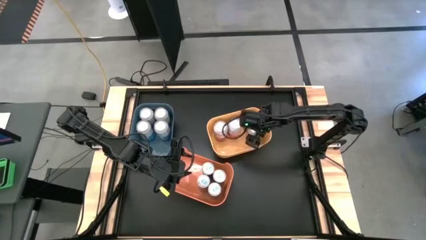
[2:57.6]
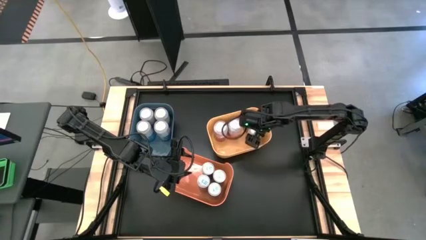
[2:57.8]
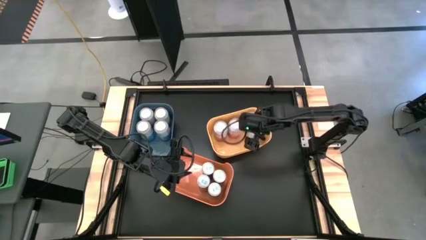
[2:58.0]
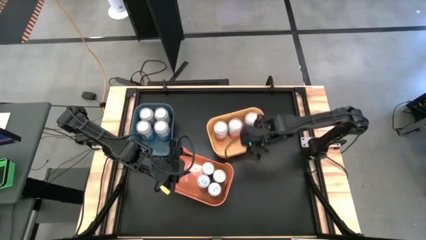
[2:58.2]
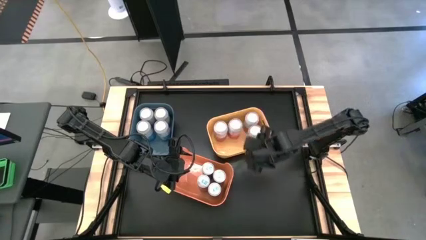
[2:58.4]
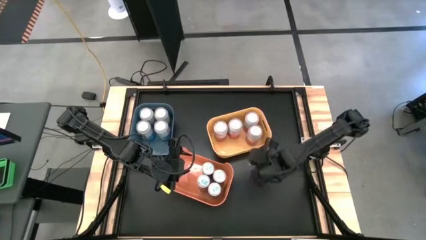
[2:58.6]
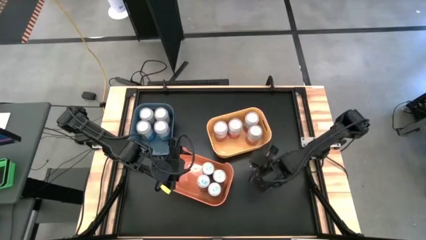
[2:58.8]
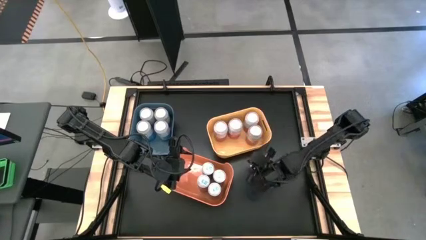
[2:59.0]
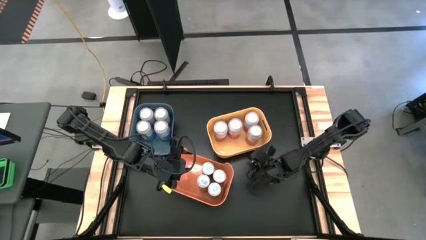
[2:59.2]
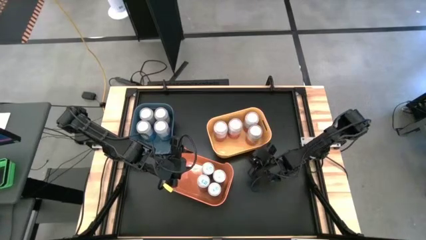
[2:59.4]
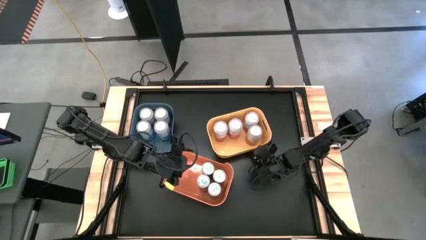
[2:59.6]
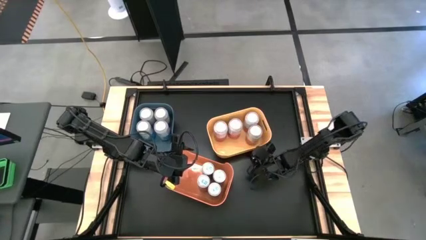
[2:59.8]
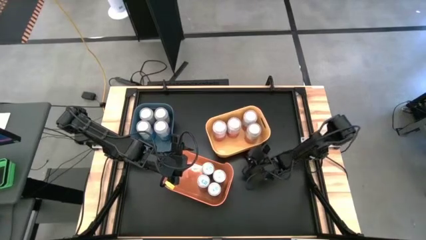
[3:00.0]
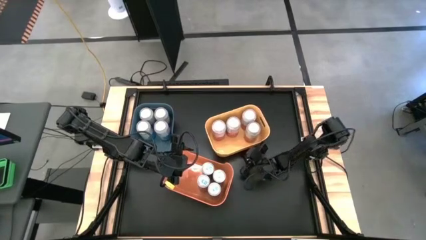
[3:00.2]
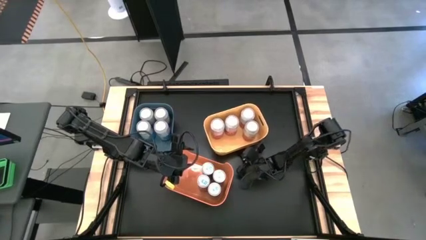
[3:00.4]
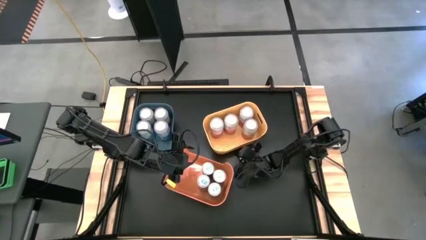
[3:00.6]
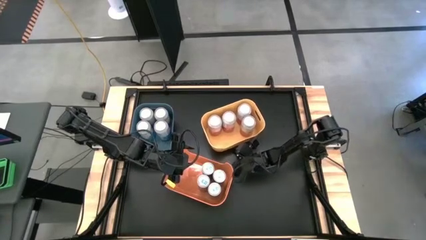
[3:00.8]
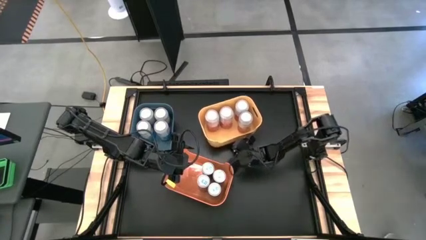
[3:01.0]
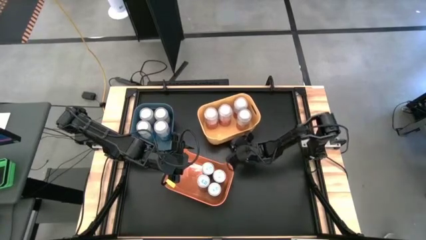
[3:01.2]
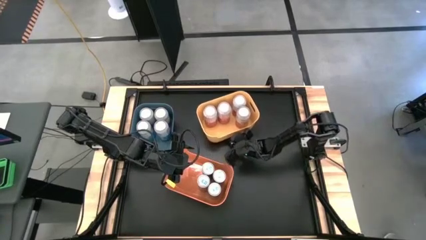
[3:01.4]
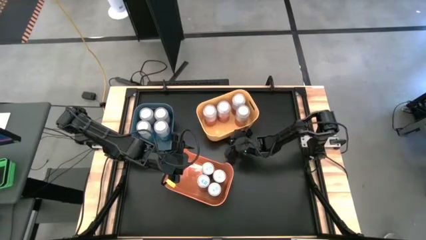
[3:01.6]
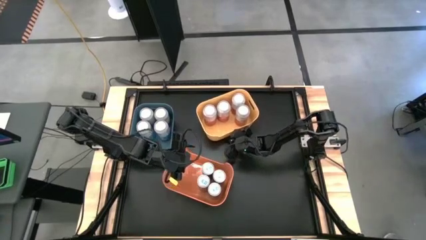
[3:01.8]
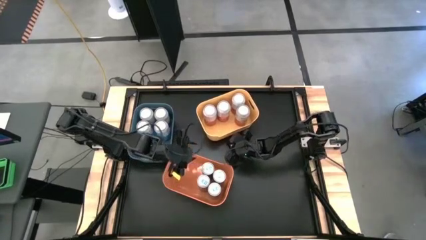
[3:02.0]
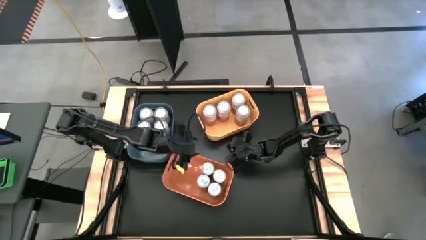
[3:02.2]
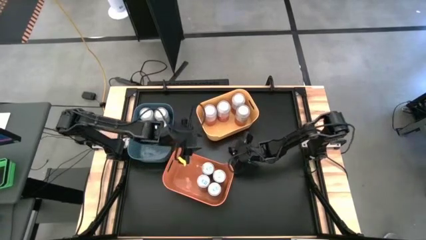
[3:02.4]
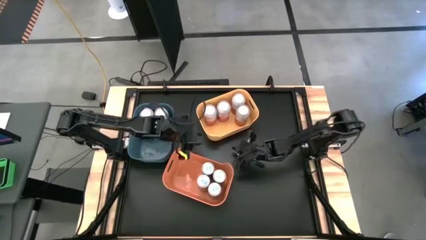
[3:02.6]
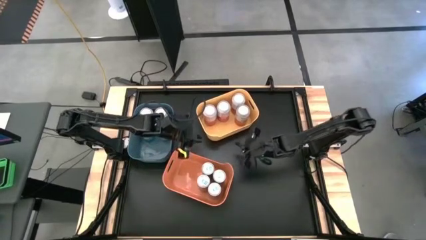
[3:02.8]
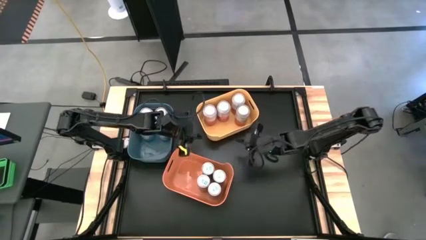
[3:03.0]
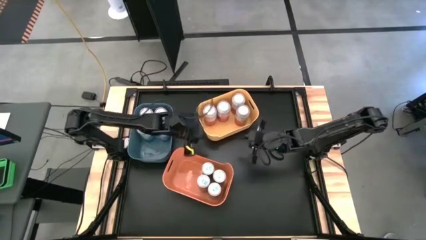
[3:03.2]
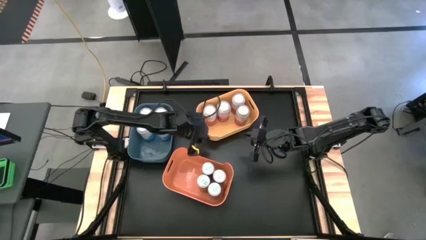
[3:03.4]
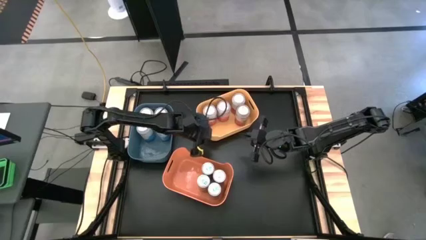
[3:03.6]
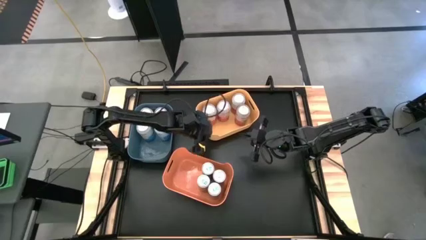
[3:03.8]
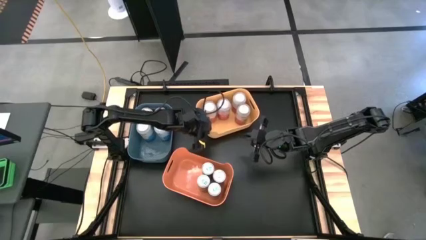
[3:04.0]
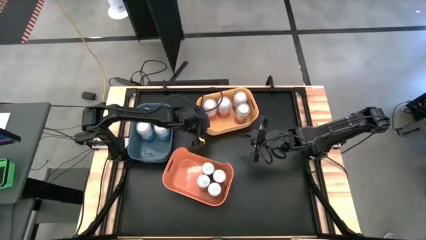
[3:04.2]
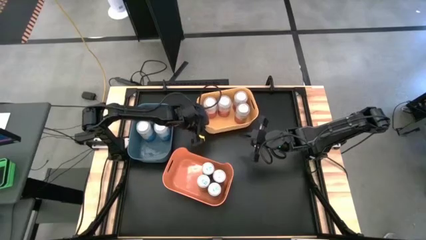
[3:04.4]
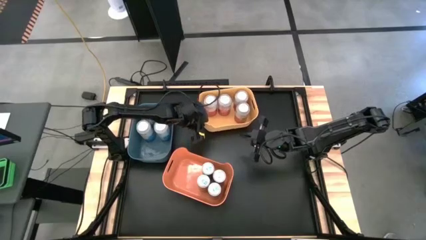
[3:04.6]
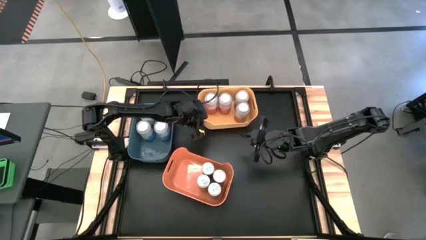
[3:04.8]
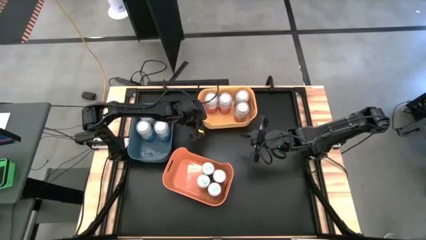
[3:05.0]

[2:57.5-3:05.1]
Task: Sort soda cans
Move the yellow bin

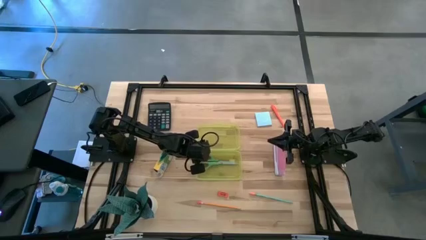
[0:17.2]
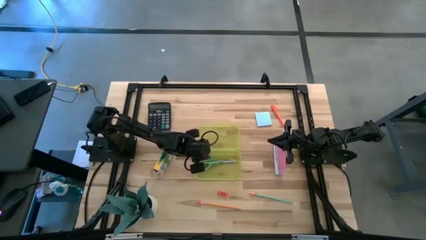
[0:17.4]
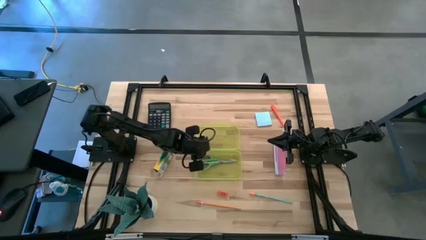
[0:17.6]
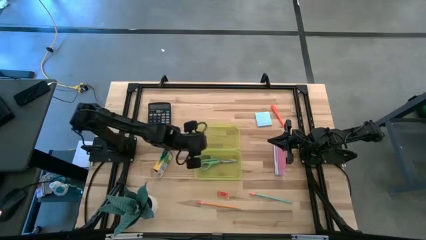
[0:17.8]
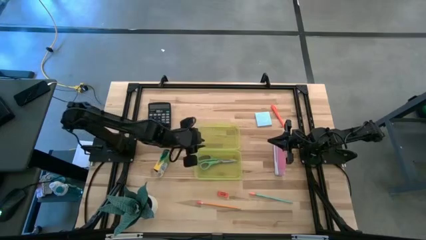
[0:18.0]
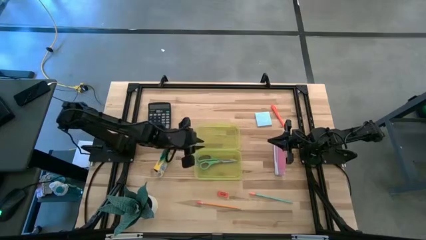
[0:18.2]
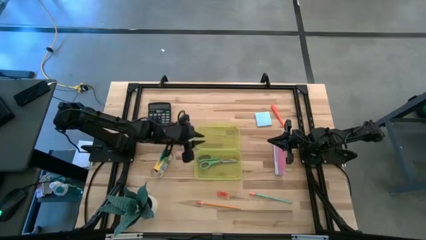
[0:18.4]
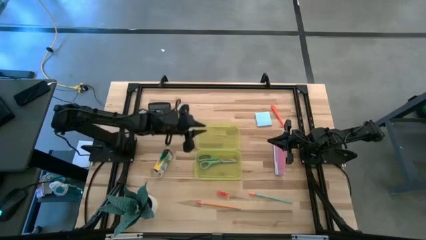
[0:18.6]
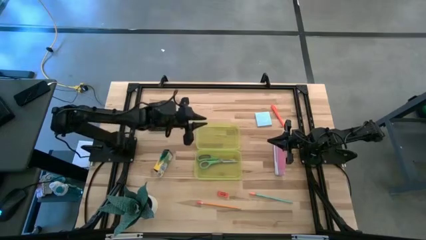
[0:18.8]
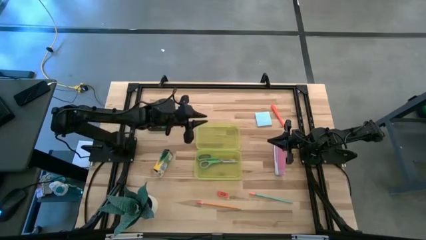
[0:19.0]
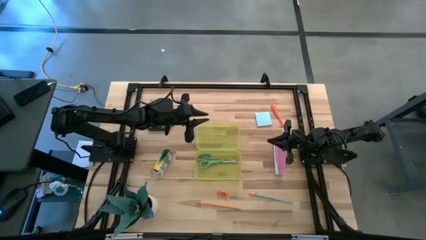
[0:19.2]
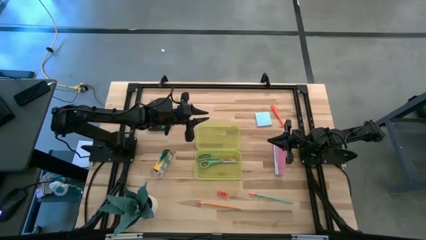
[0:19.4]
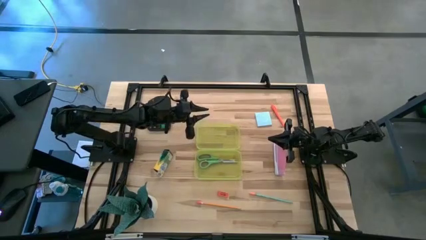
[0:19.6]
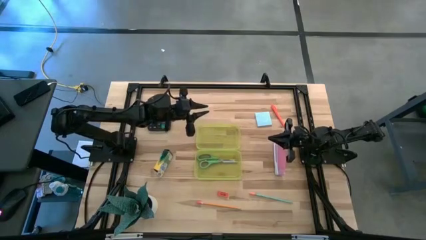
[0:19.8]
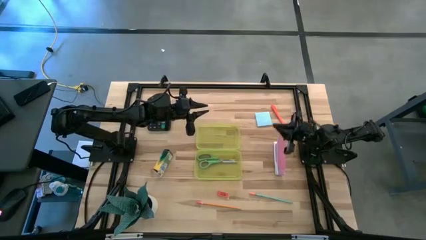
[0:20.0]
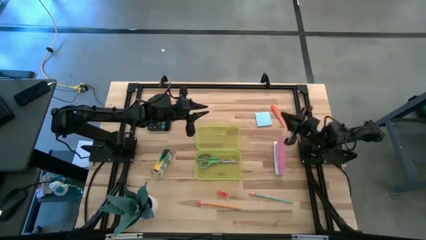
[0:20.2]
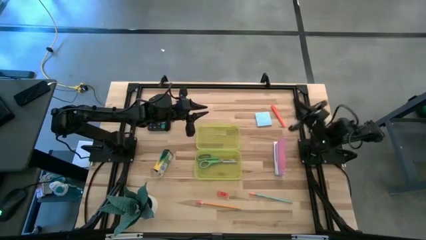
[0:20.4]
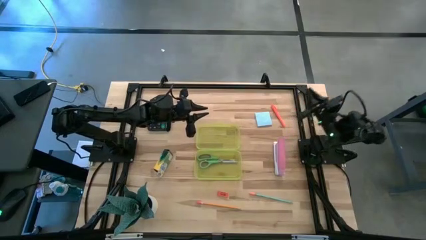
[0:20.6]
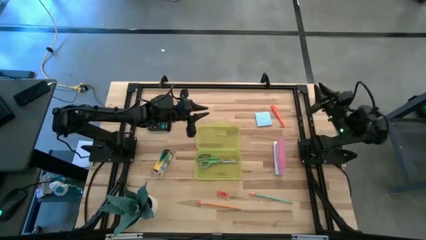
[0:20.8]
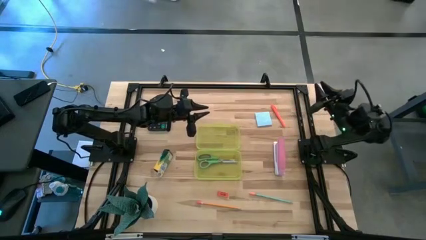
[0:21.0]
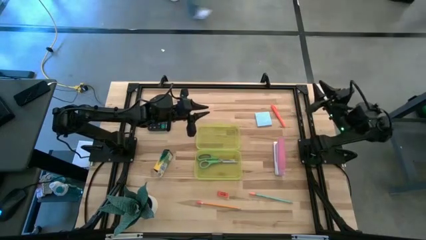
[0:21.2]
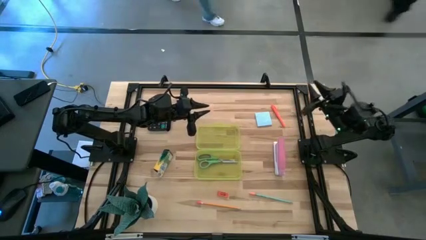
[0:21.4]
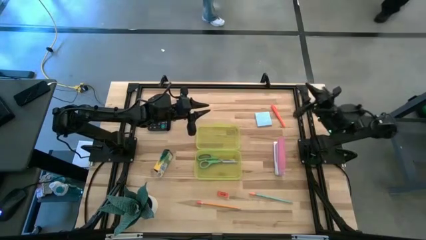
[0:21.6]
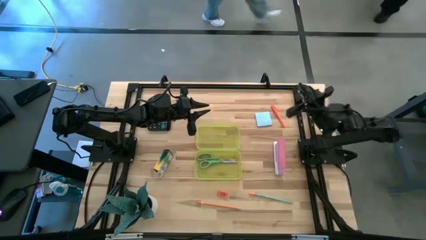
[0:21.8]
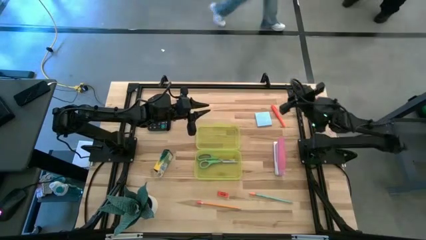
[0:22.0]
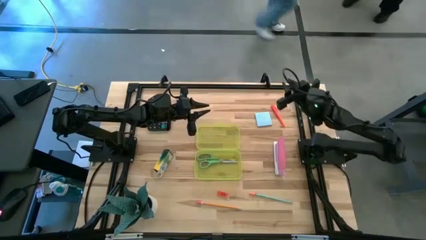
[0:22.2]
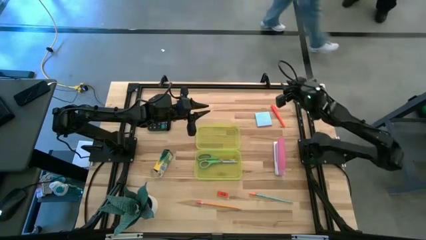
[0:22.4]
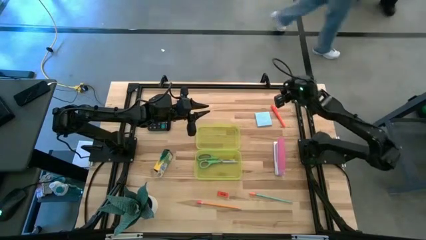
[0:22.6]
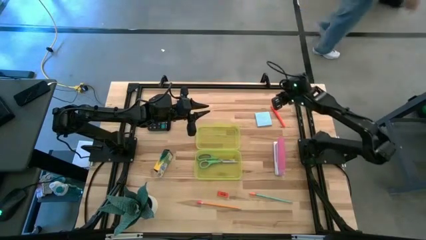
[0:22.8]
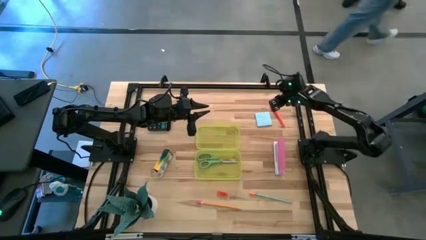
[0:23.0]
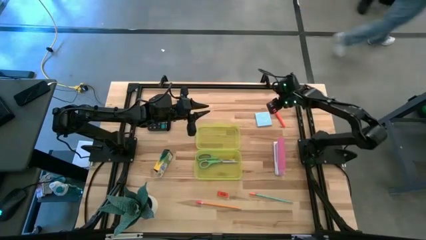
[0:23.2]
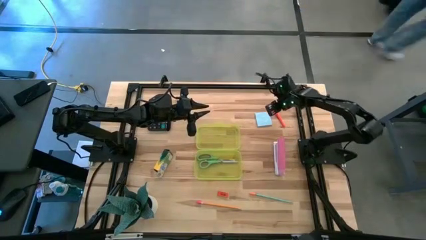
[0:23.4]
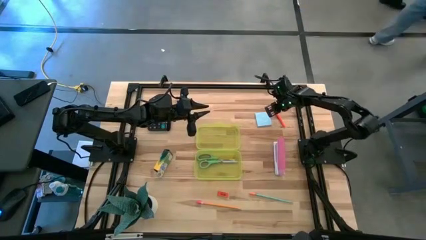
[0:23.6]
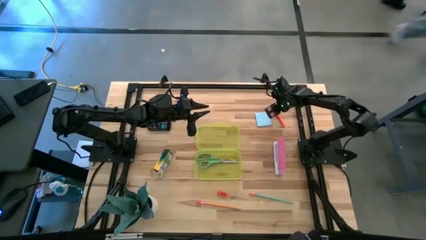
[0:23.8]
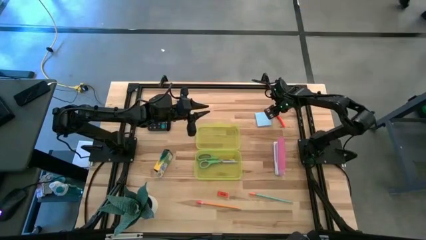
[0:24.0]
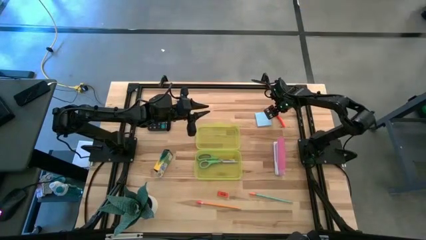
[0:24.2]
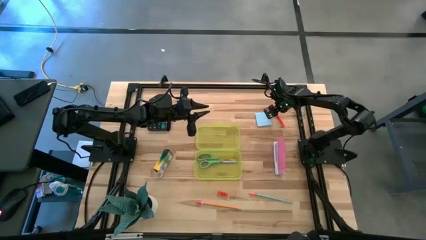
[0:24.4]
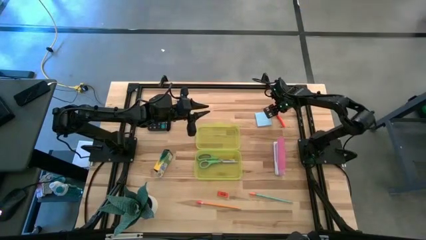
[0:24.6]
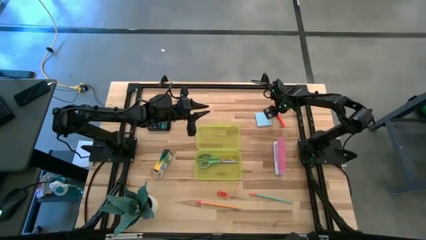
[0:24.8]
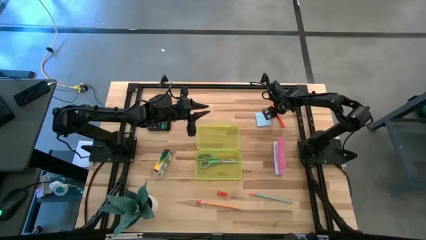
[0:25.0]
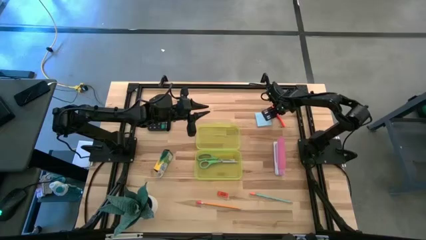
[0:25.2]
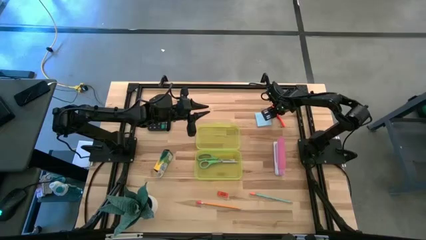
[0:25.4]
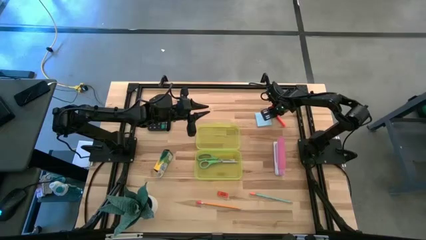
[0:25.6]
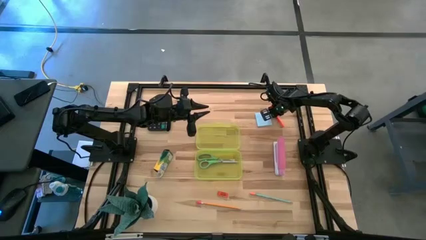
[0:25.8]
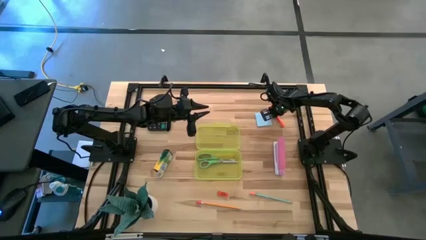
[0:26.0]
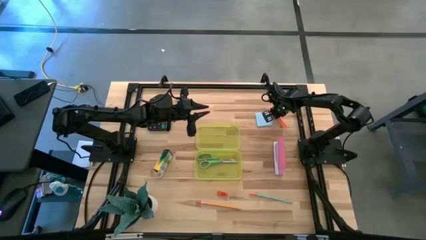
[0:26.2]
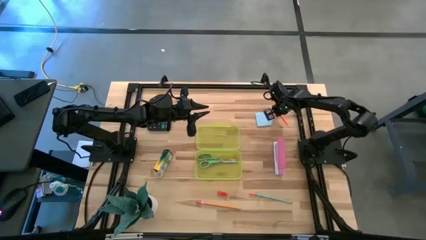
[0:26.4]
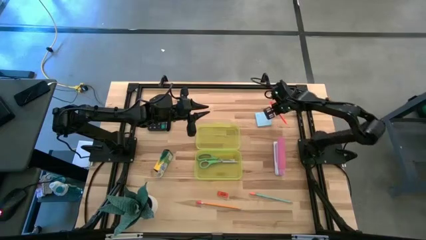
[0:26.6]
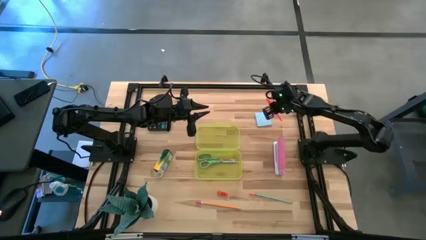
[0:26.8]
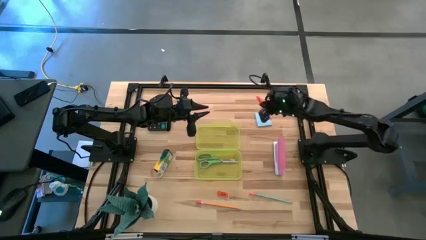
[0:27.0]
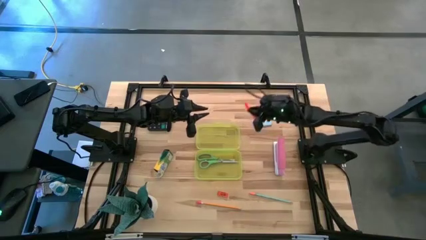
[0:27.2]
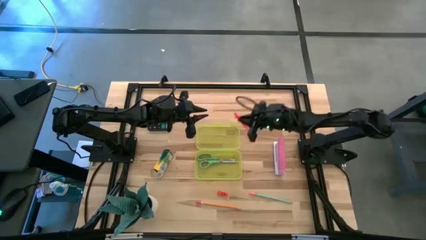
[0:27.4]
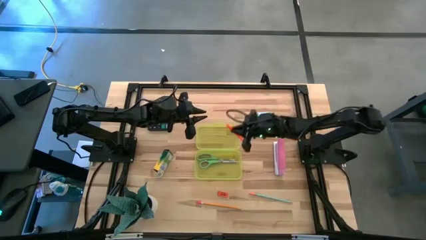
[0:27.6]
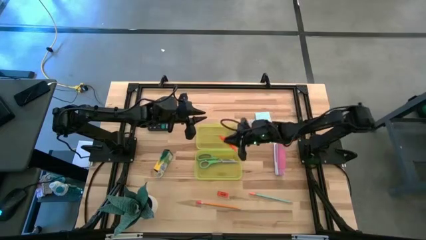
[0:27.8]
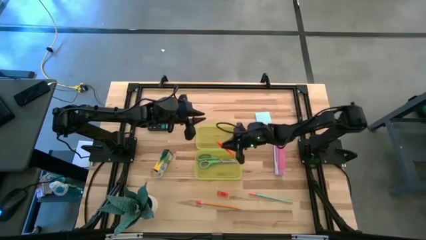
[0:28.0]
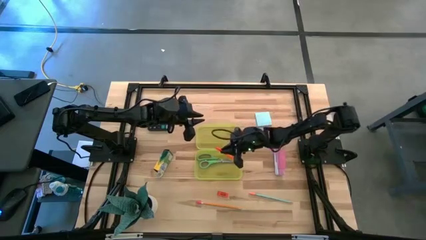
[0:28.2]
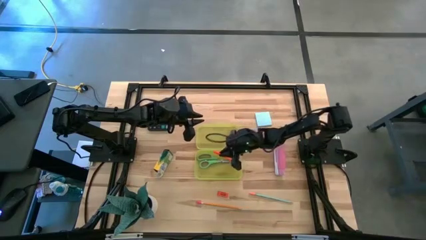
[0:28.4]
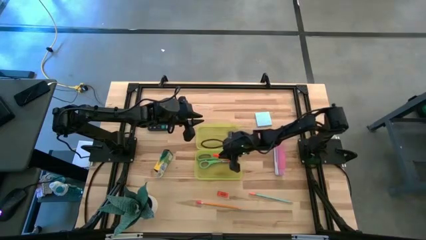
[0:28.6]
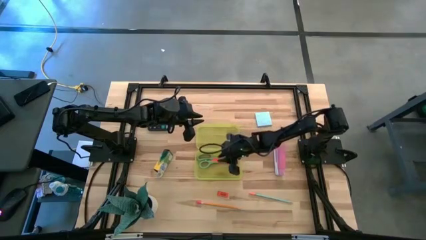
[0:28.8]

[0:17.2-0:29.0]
Task: Pack school essentials
Put the orange pen into the yellow supply box
